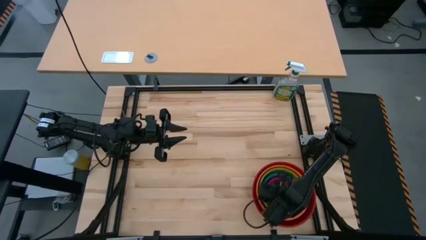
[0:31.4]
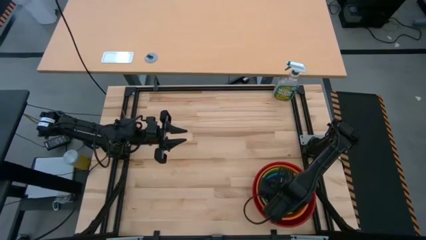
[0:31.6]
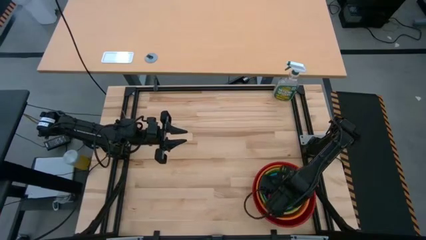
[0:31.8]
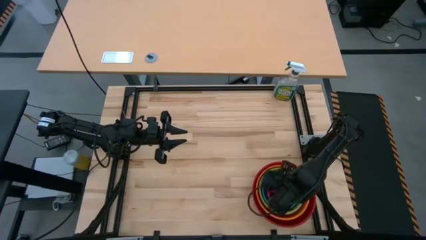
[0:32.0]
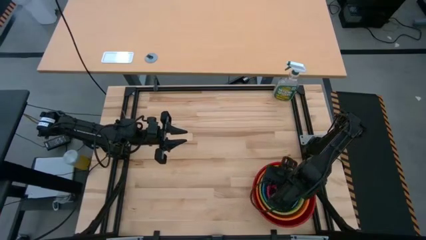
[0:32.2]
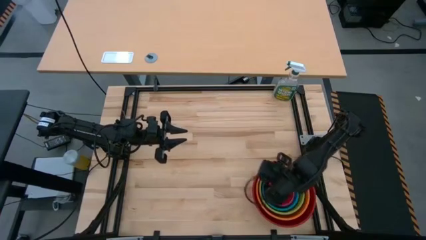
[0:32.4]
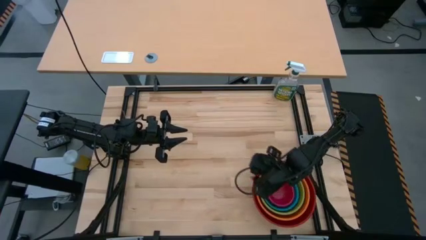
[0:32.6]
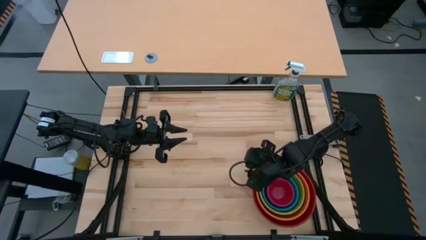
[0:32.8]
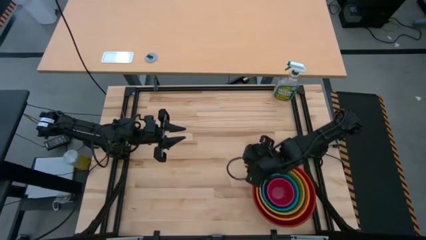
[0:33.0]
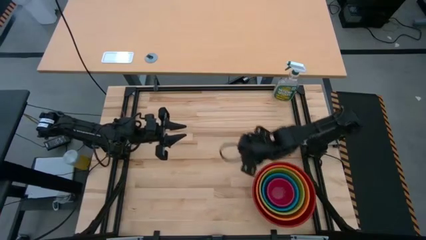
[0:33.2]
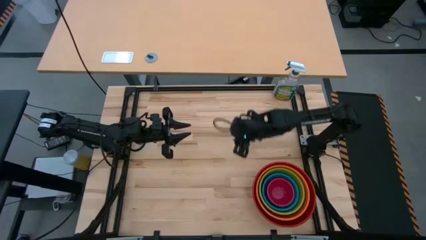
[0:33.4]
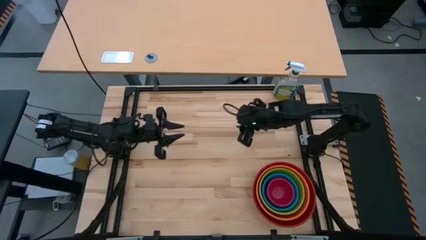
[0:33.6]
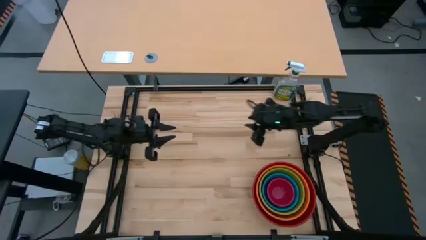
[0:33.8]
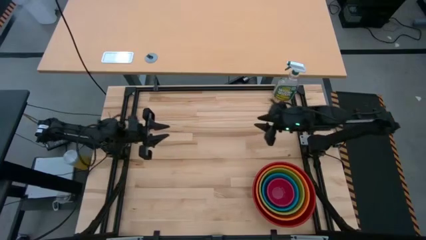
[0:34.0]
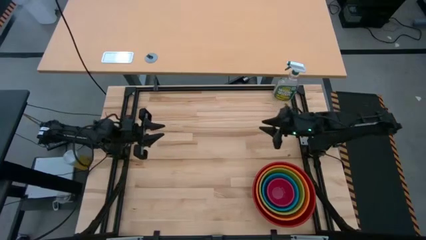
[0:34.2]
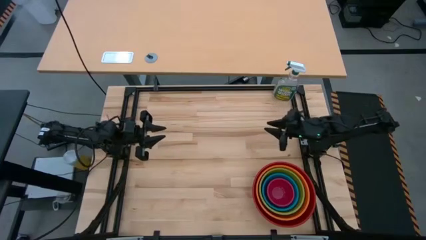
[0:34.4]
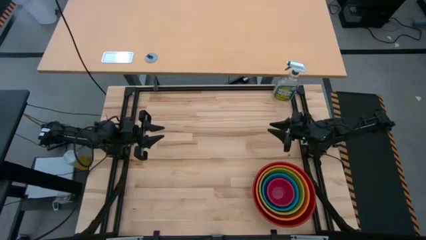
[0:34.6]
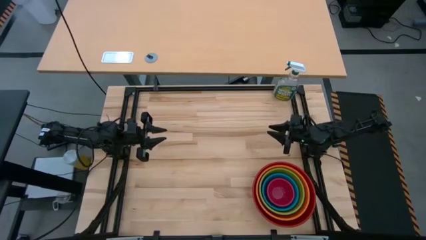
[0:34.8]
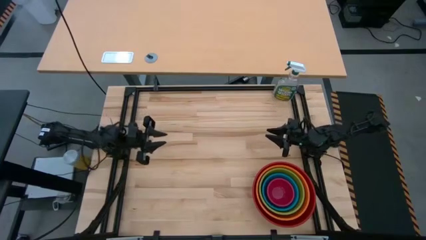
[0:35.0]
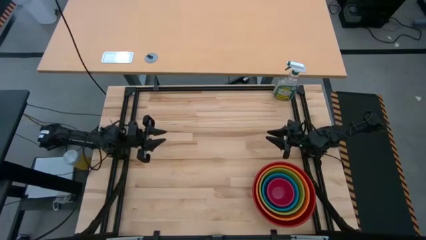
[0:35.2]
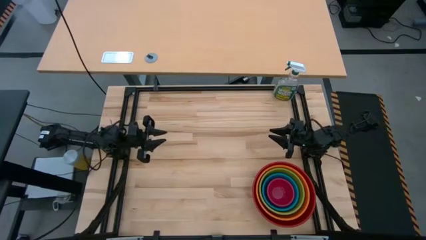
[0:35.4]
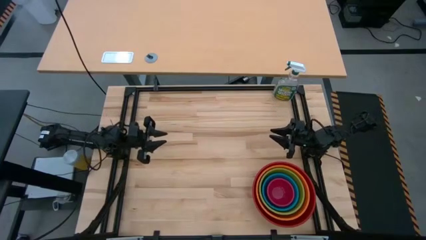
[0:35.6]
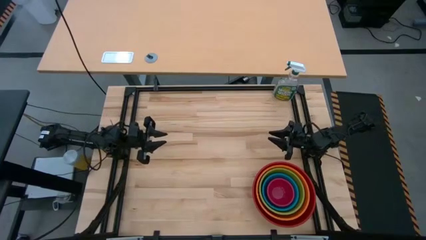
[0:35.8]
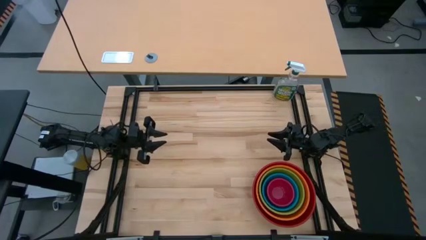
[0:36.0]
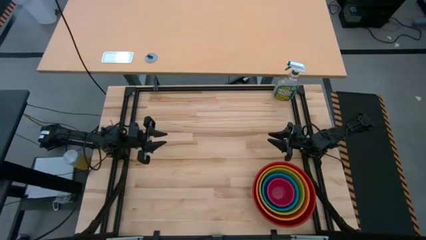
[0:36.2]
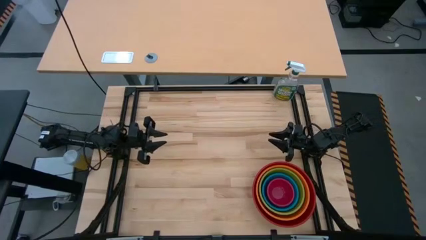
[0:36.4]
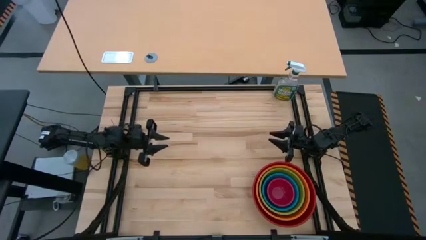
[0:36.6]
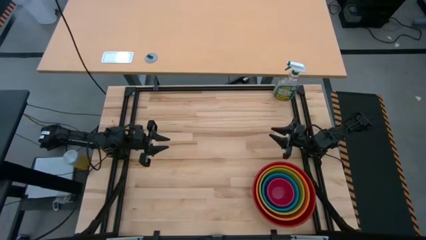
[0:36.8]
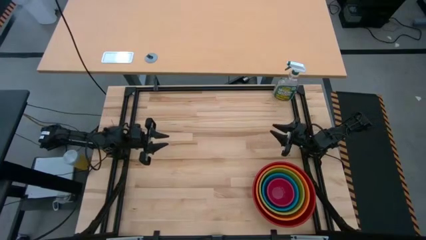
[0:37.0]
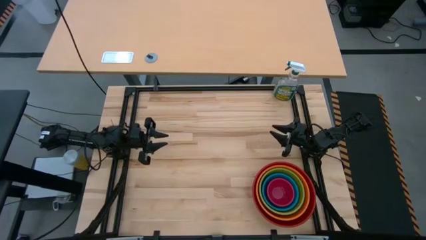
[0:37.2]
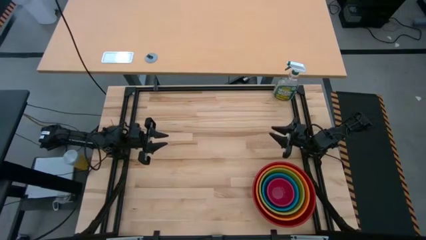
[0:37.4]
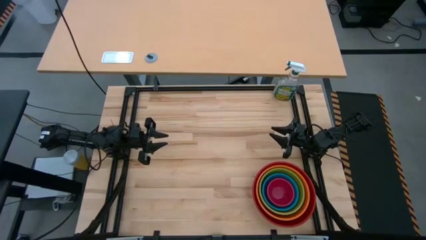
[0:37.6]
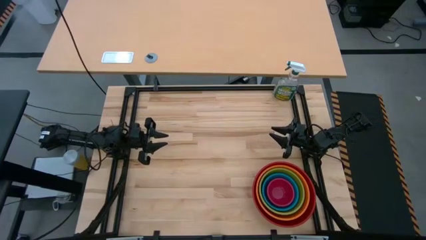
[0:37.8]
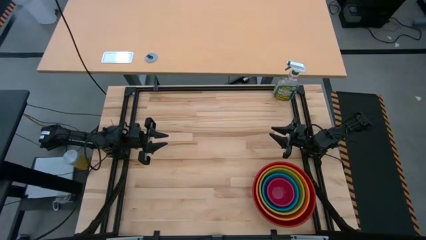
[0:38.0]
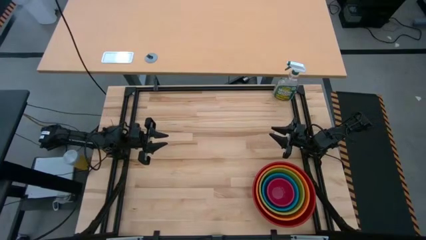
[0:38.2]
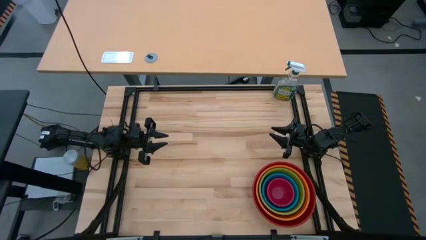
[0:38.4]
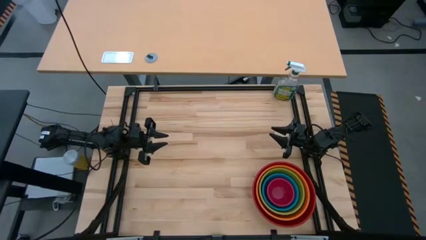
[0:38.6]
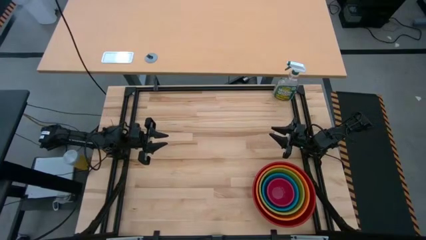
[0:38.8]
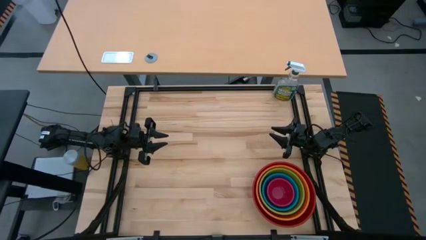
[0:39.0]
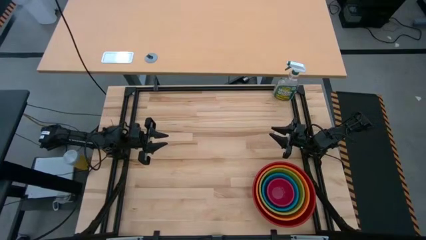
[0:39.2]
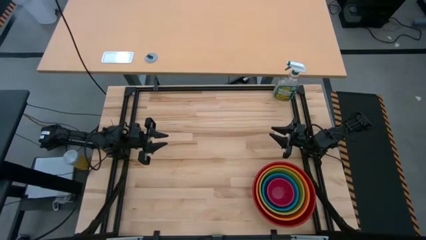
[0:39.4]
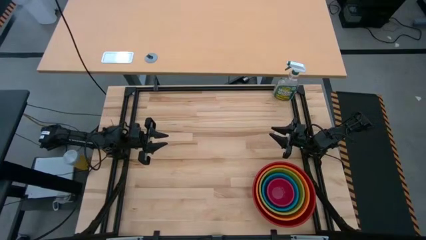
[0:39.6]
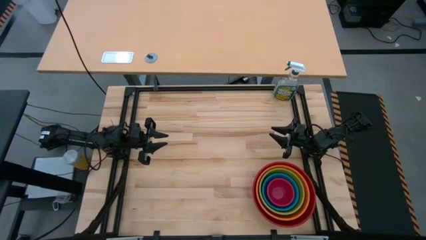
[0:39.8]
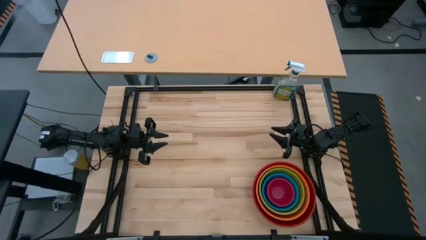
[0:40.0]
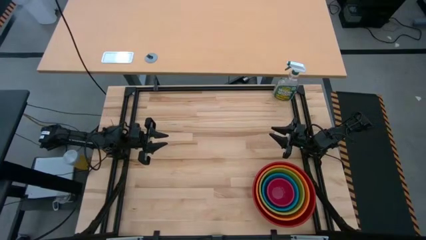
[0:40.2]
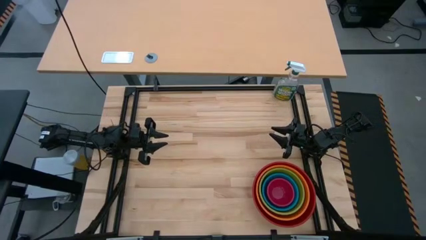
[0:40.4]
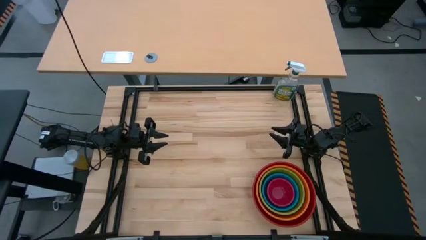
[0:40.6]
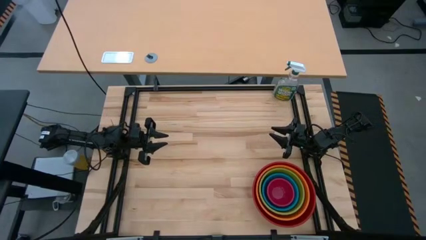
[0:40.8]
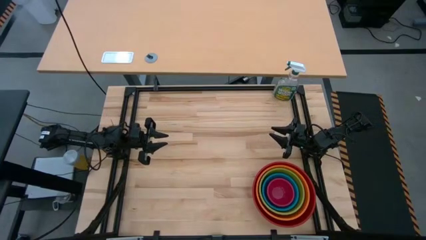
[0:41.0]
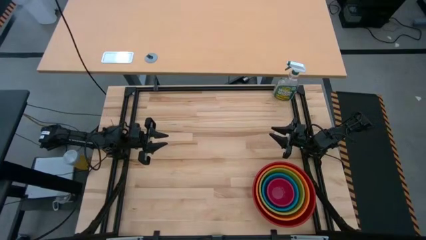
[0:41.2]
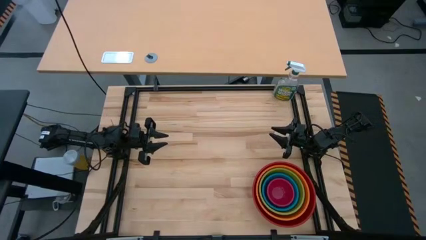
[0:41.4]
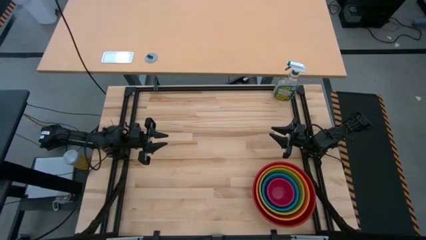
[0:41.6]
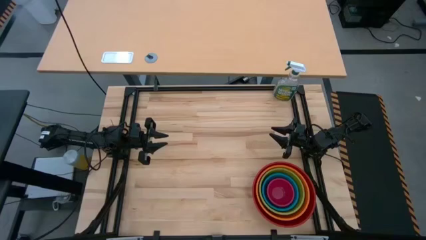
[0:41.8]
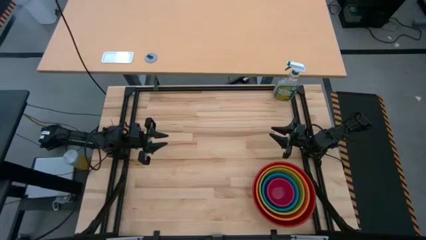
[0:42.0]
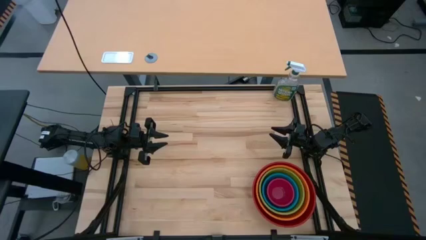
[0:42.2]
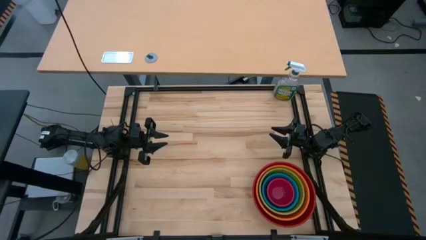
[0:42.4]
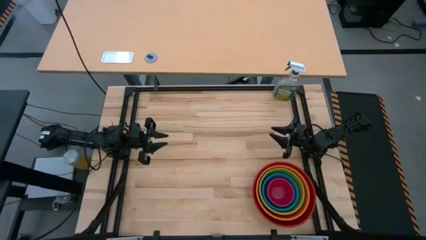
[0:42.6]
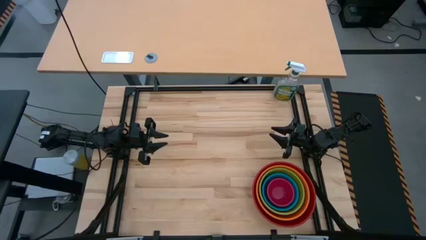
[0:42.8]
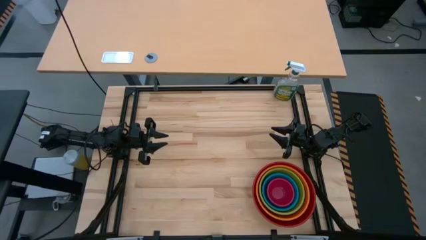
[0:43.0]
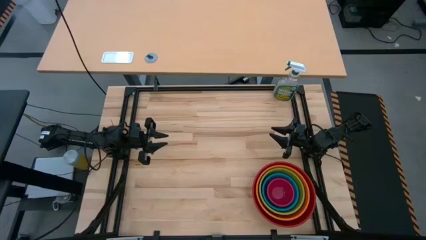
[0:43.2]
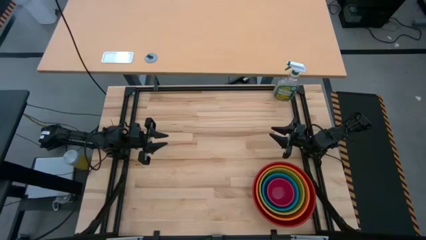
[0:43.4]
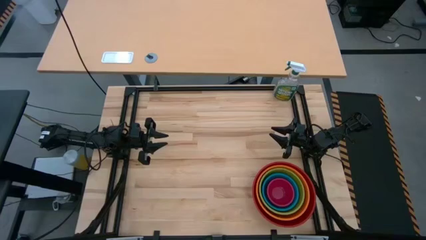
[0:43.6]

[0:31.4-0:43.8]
Return to Home Position
